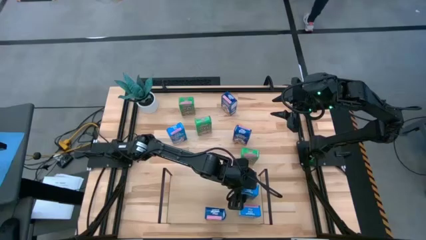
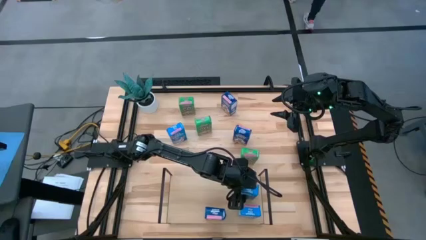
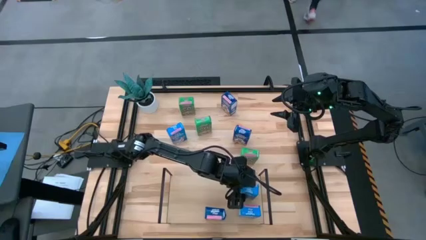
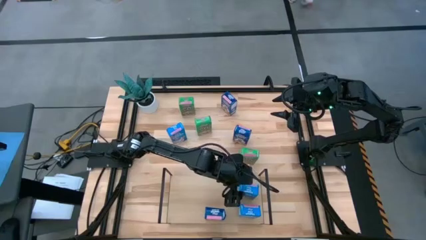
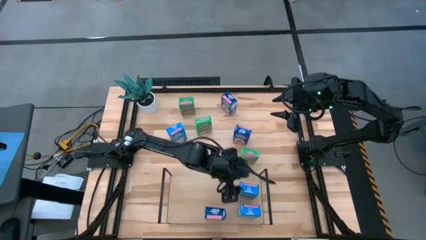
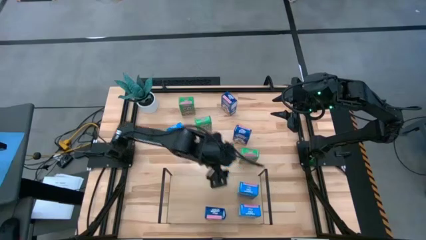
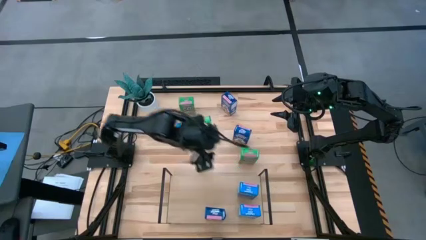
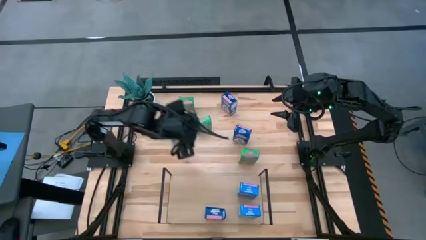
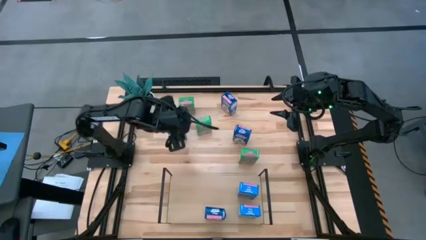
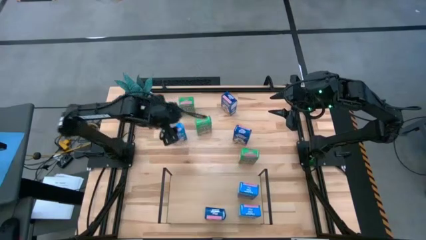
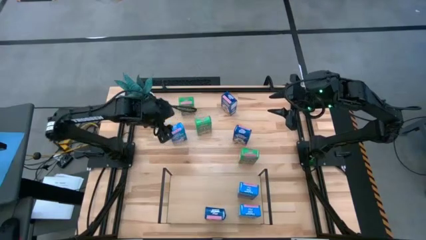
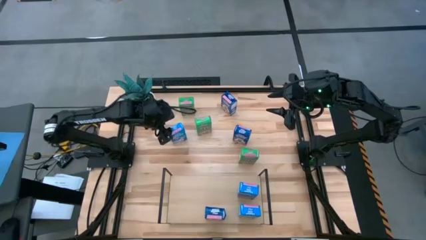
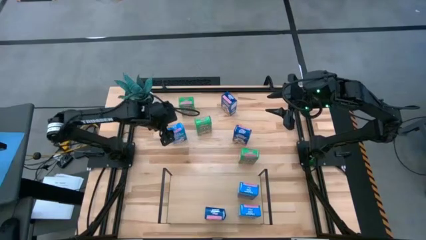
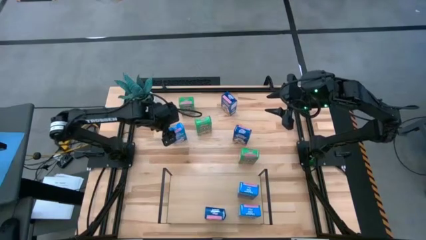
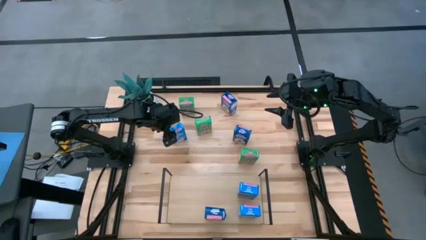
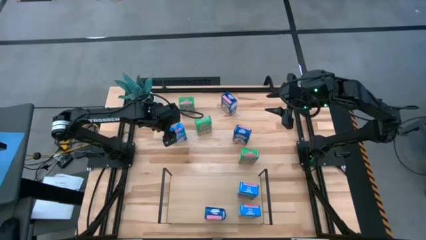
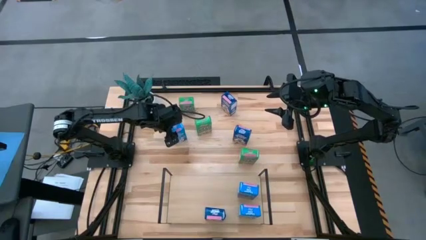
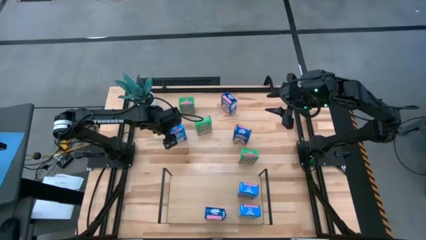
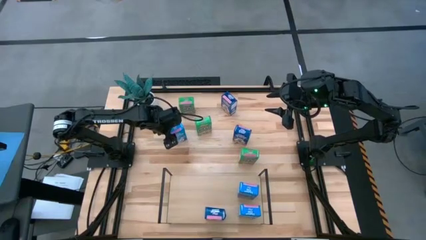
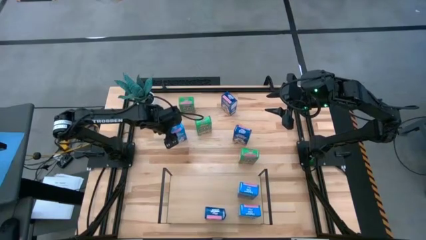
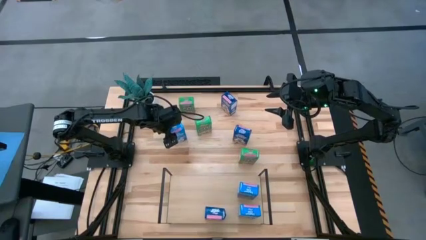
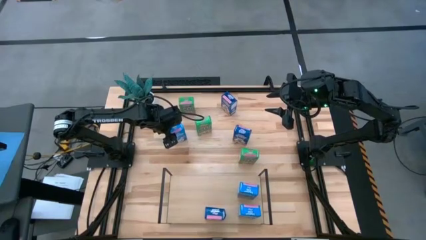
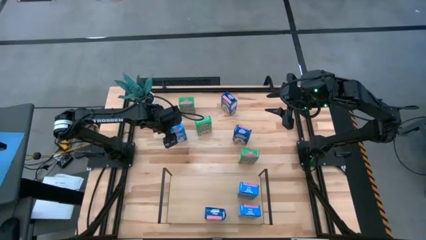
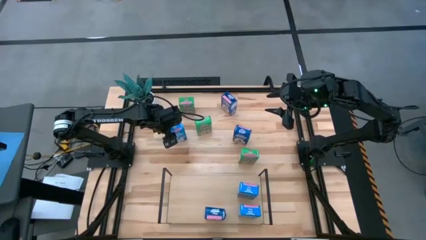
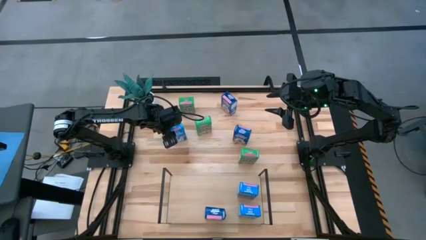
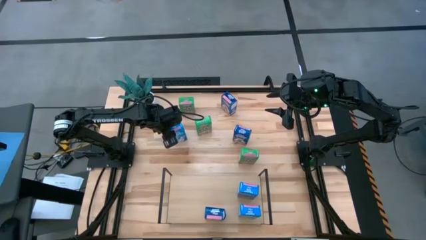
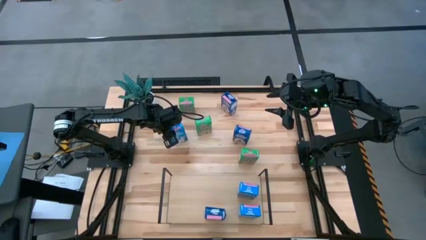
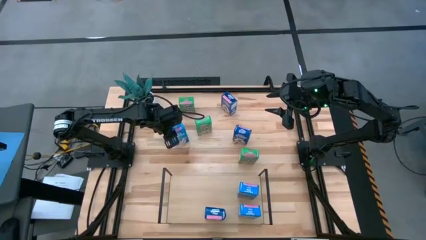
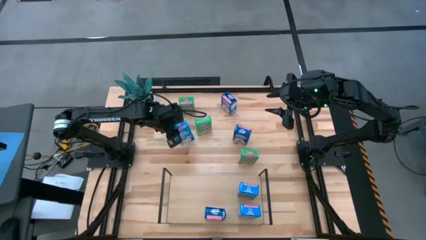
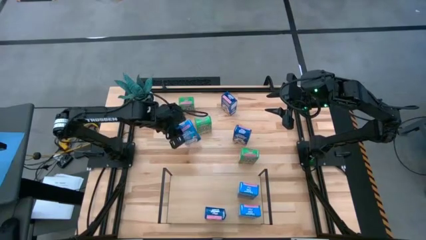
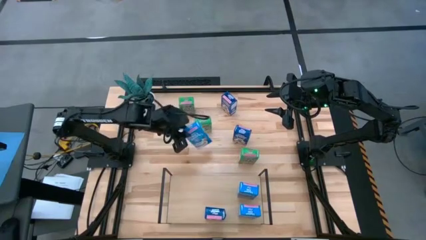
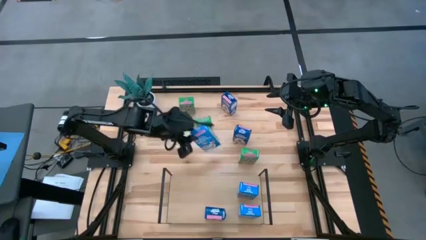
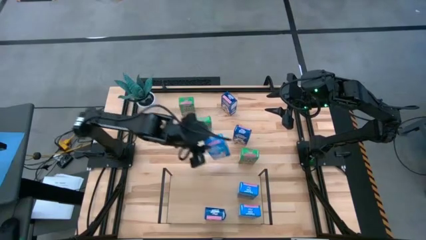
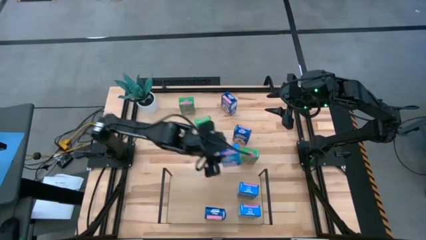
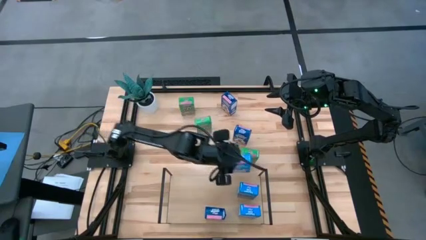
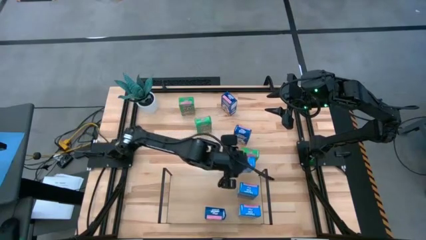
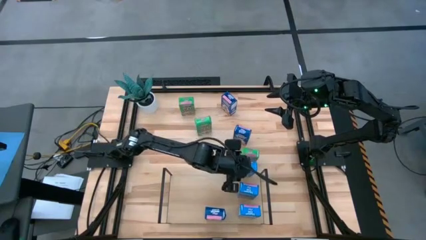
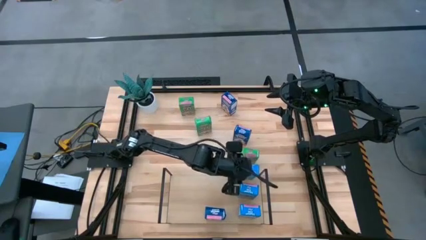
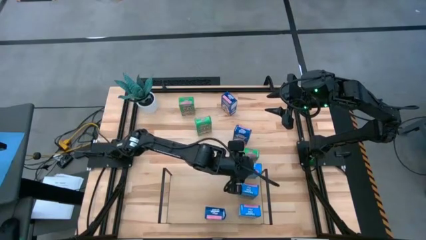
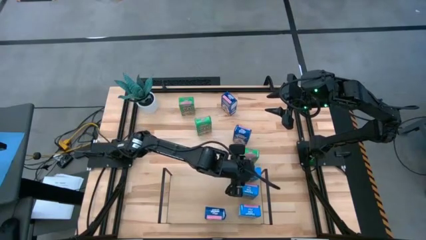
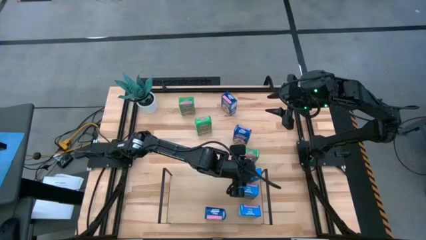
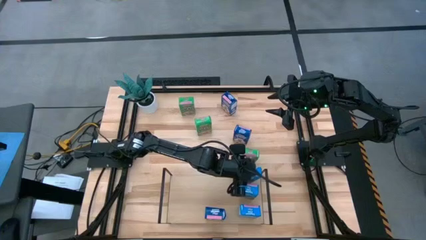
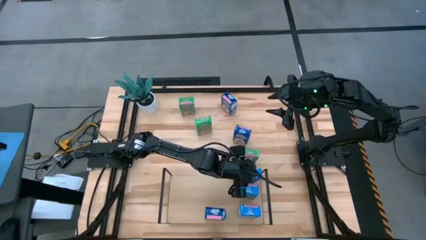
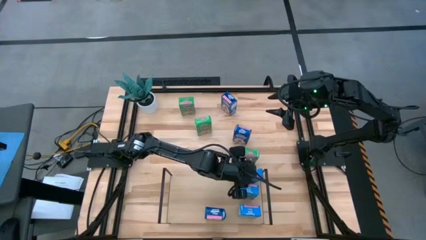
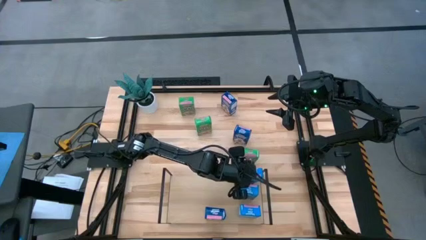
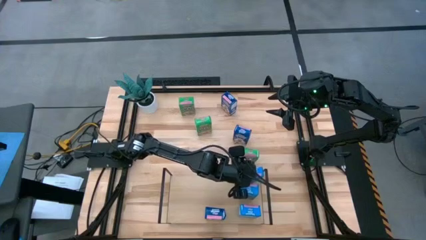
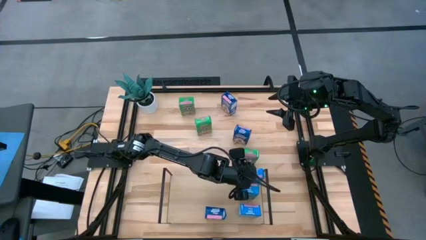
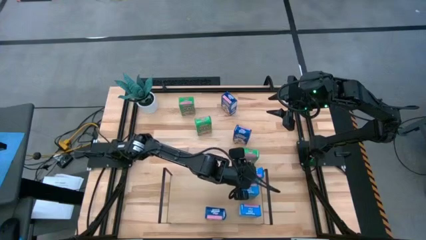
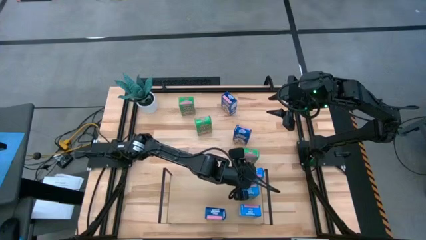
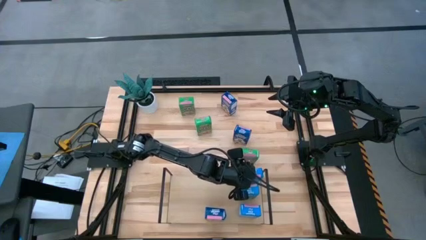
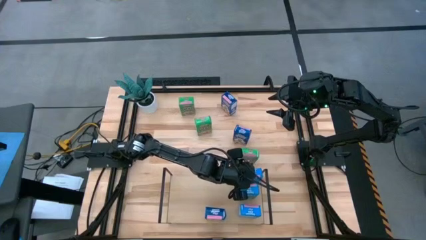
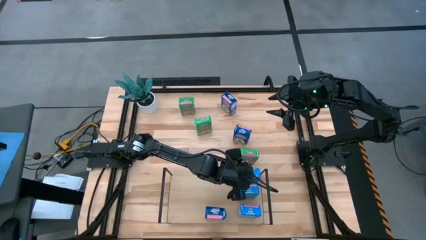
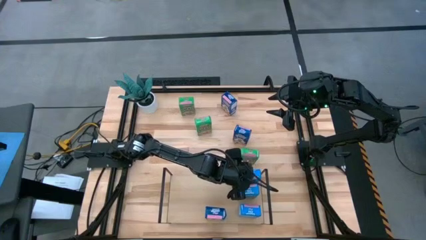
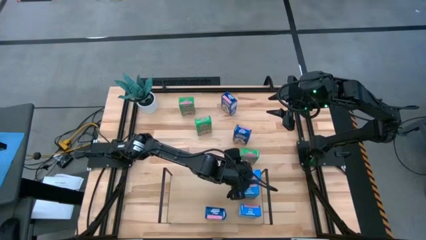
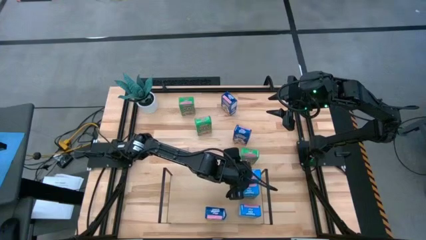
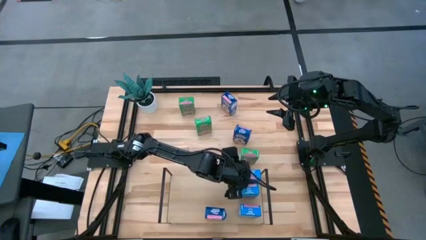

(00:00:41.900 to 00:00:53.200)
Task: Stack cereal on shelf
Put the light blue cereal box on the shelf aligned with the other light blue cereal box
